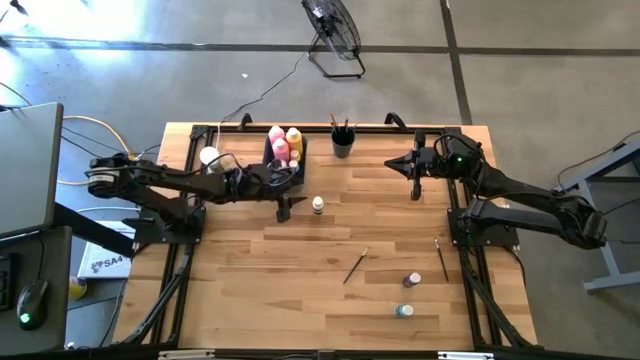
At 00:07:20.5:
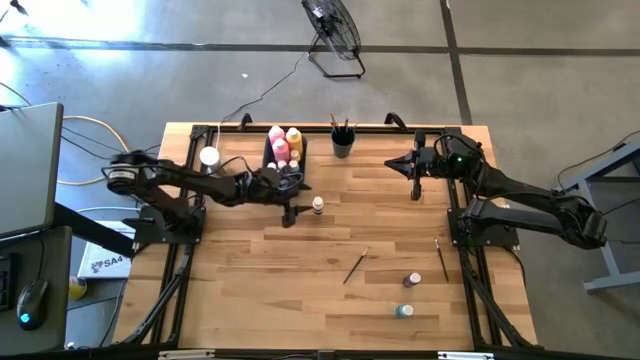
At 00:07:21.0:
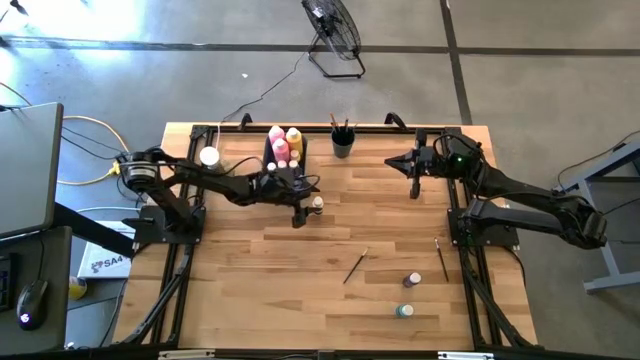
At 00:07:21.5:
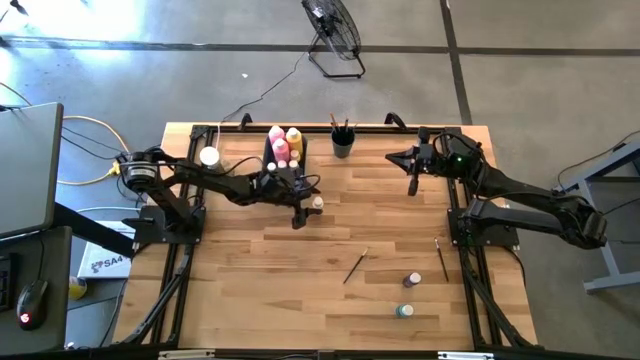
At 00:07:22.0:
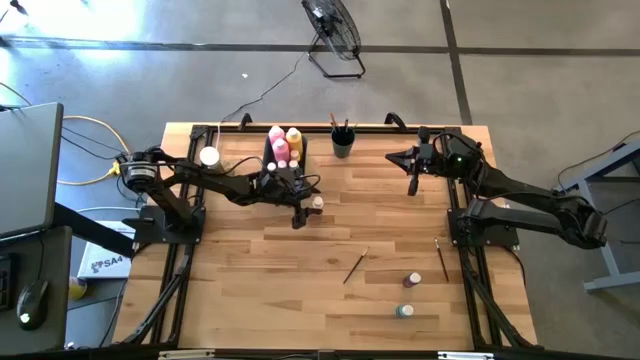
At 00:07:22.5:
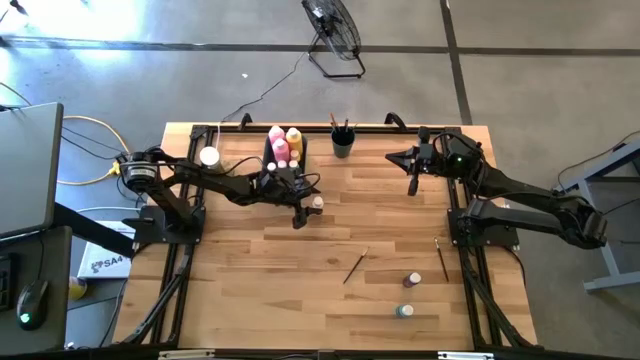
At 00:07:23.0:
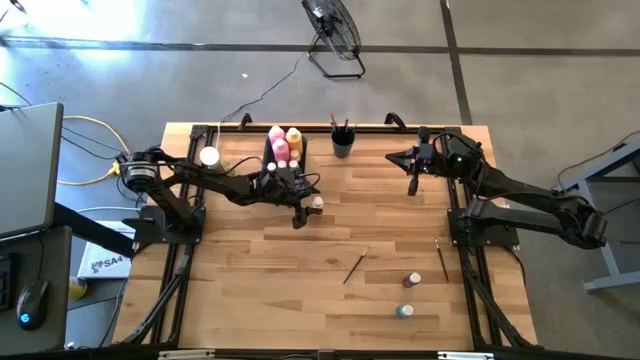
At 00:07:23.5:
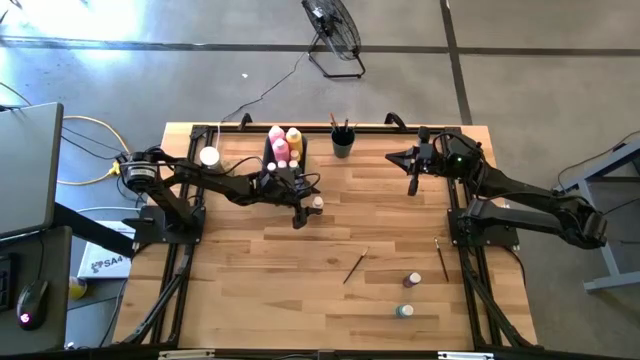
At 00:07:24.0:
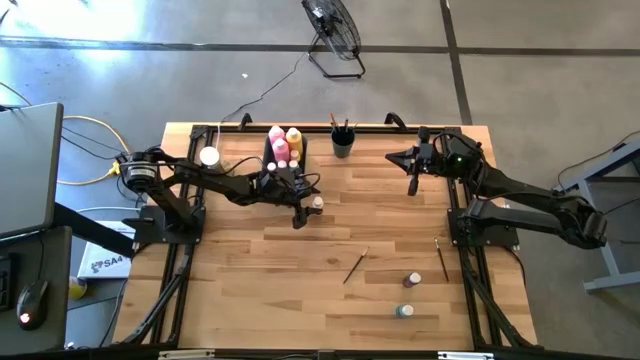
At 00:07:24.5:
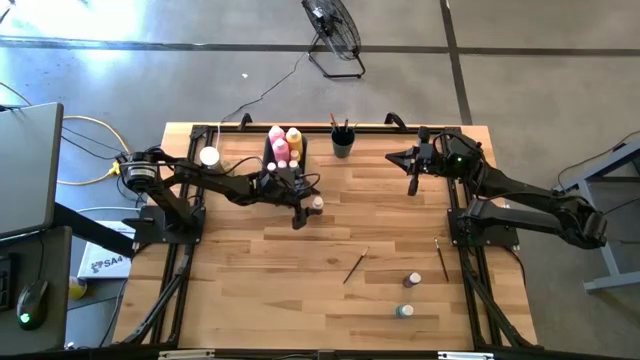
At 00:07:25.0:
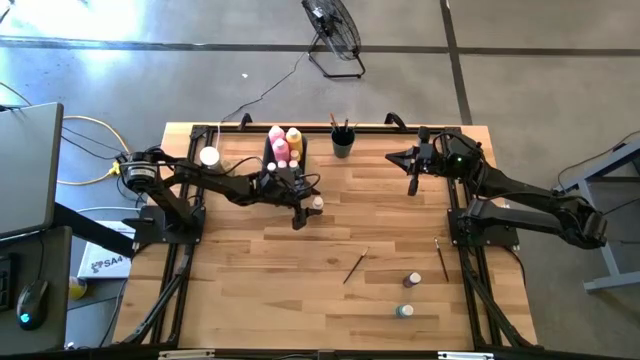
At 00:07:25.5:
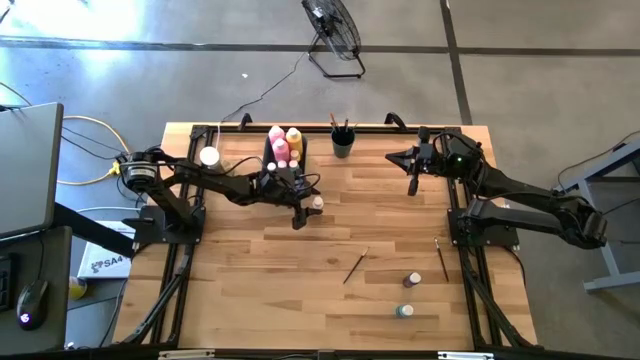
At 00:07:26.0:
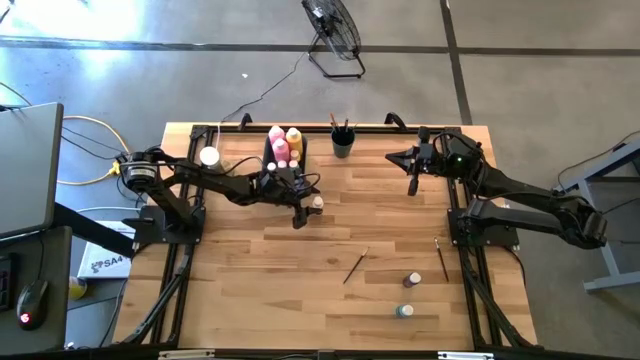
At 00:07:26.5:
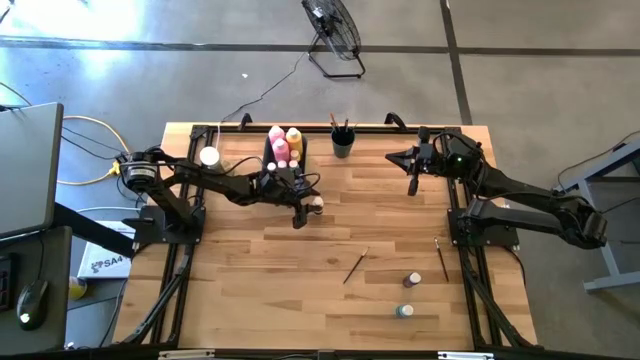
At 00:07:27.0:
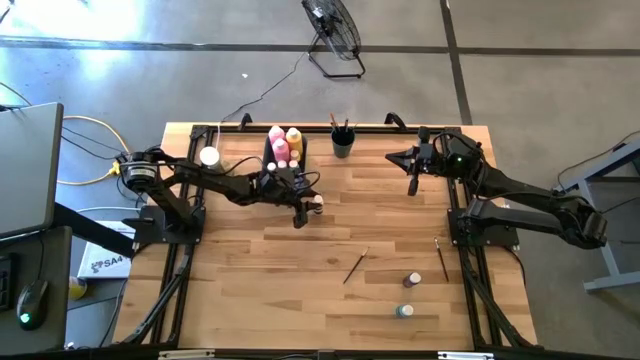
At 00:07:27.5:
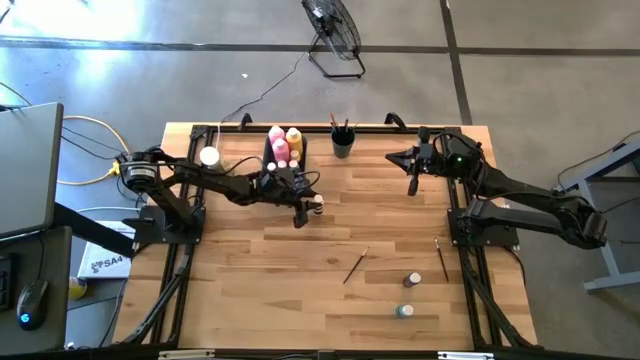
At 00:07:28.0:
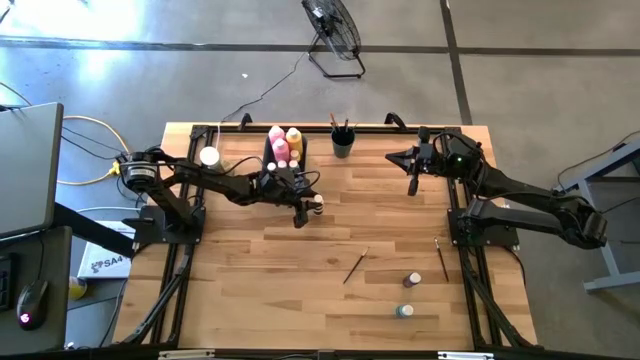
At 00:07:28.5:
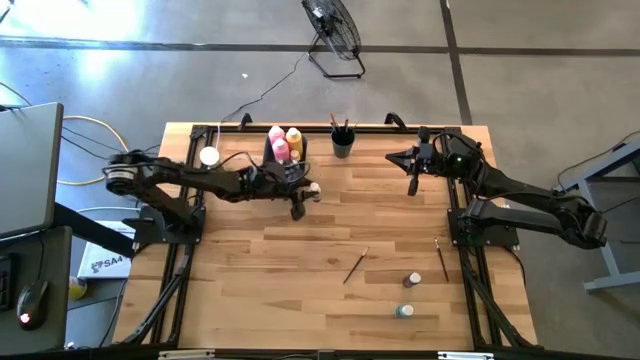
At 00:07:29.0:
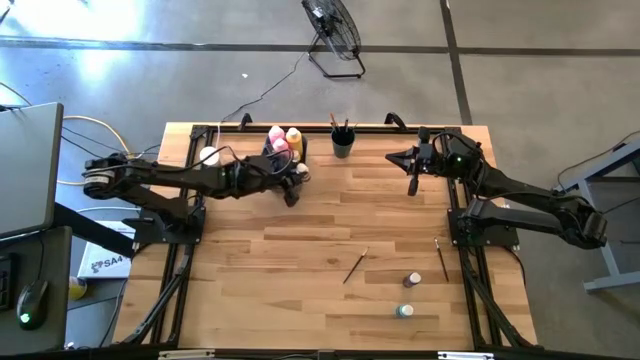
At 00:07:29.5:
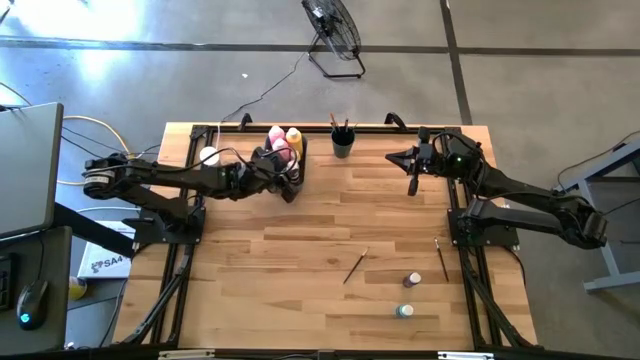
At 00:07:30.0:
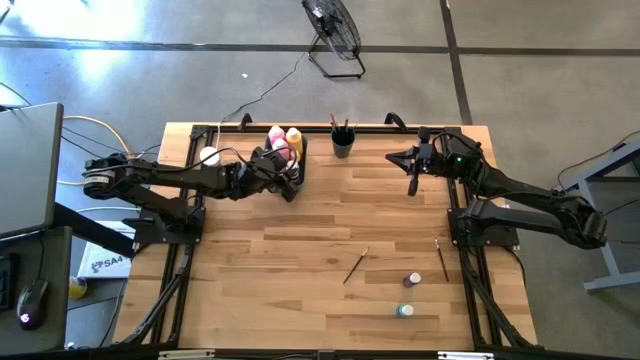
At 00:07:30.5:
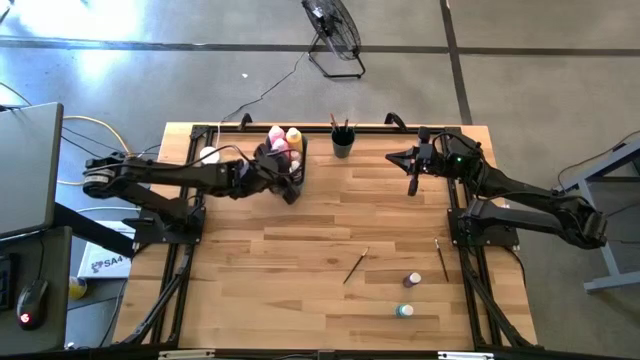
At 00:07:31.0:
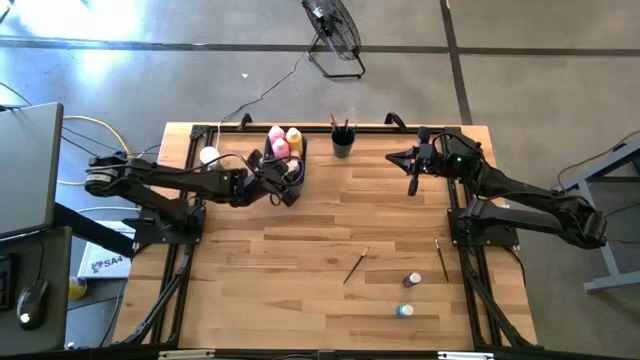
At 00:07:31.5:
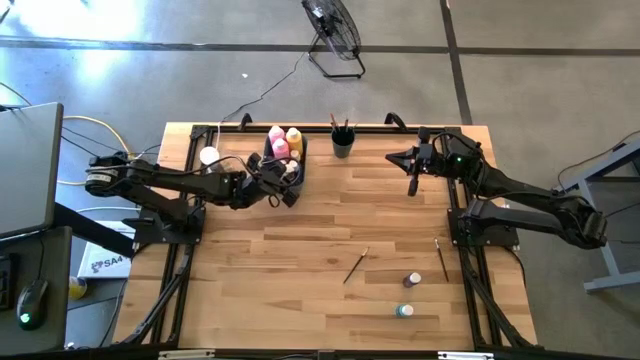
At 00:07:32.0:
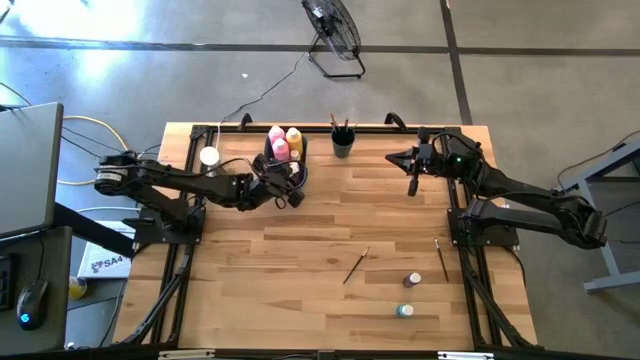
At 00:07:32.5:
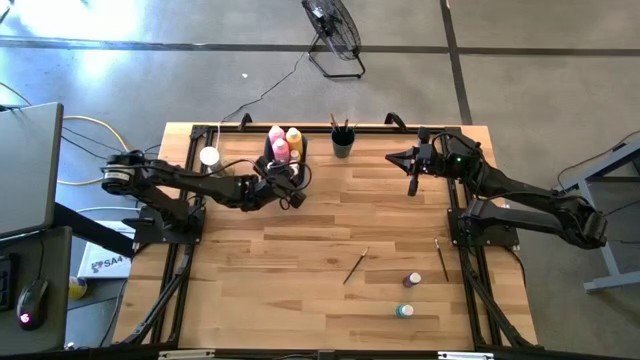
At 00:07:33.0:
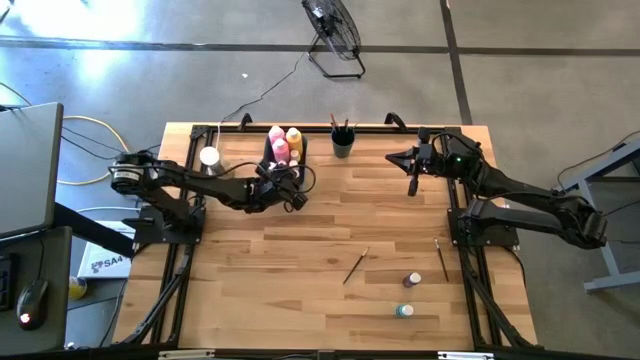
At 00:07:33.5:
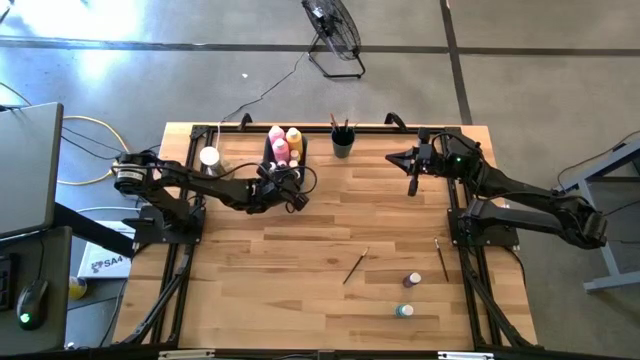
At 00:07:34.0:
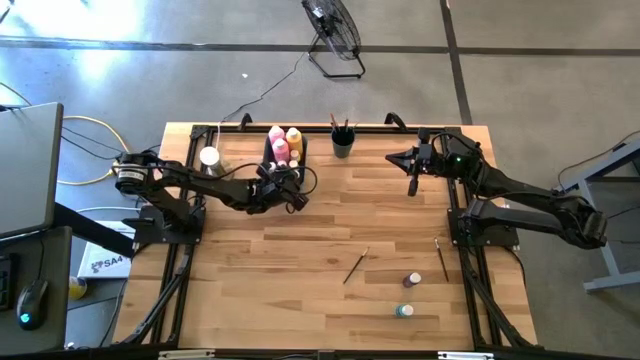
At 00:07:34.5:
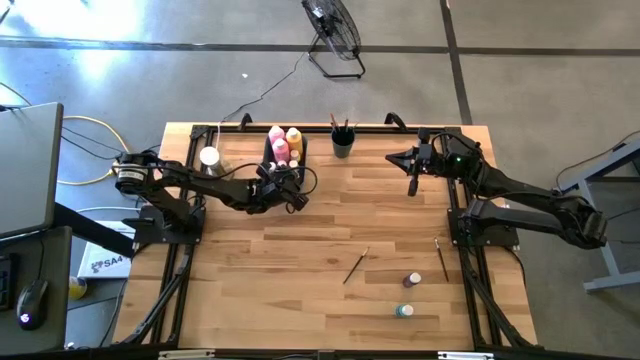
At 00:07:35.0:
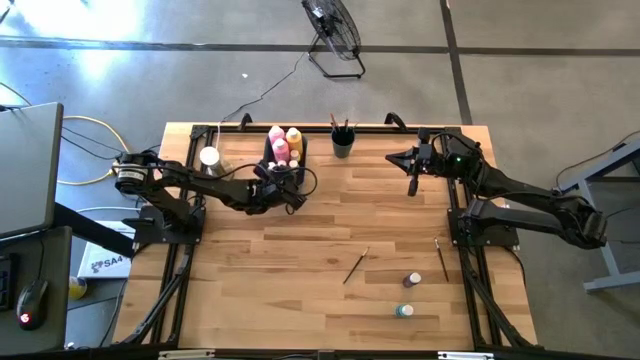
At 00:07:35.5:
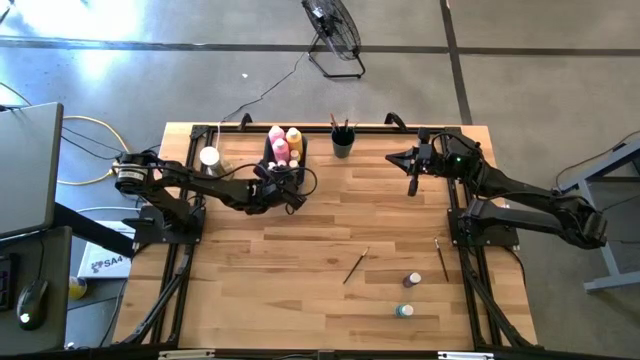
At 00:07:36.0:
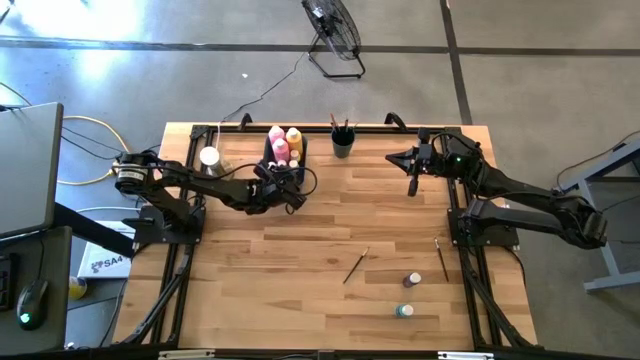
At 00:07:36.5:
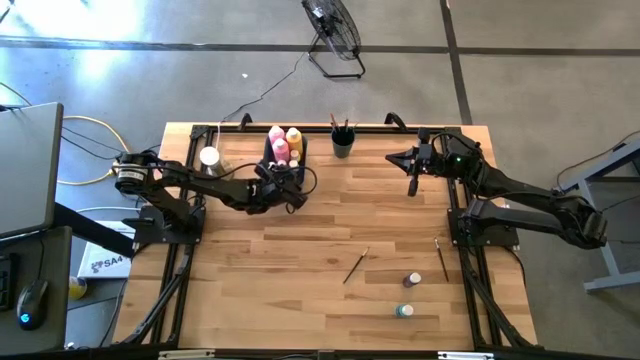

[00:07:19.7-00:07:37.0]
Task: Pick & Place Paint Supplies
Put the small white paint bottle into the green bin
